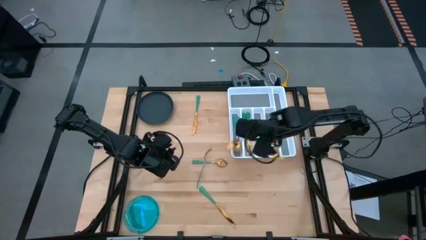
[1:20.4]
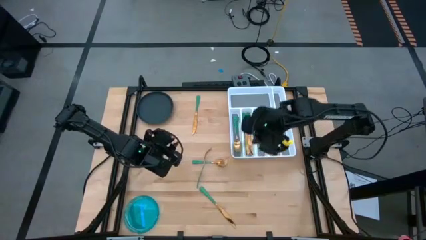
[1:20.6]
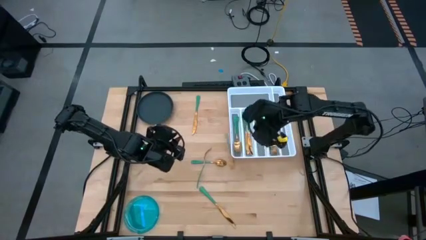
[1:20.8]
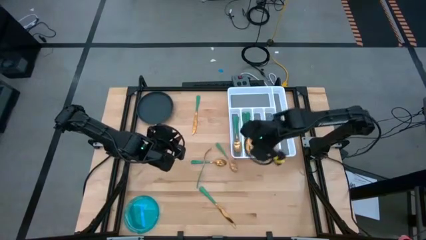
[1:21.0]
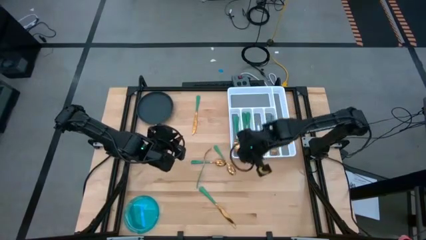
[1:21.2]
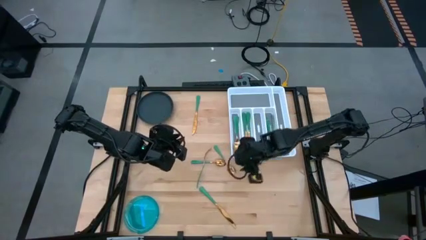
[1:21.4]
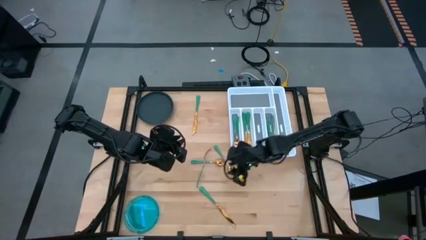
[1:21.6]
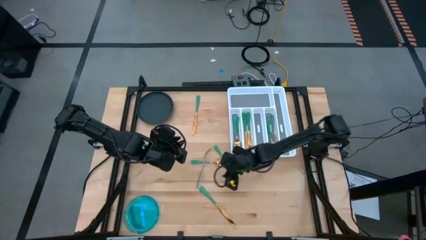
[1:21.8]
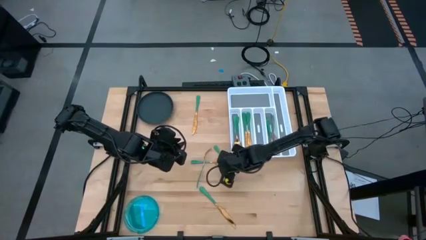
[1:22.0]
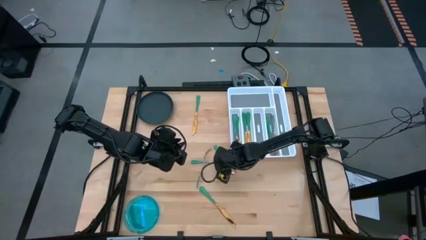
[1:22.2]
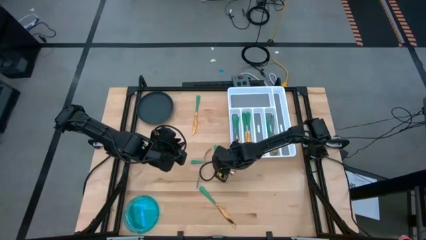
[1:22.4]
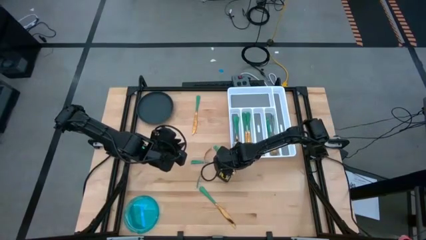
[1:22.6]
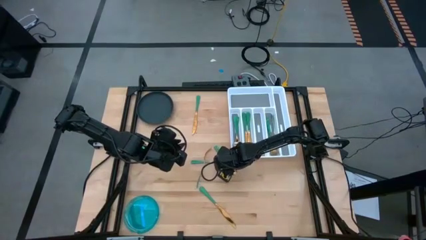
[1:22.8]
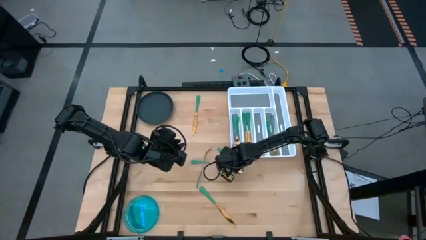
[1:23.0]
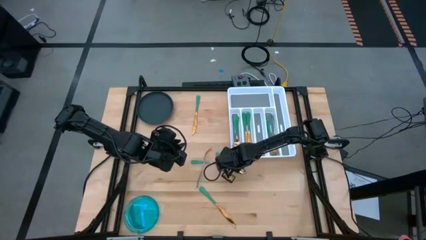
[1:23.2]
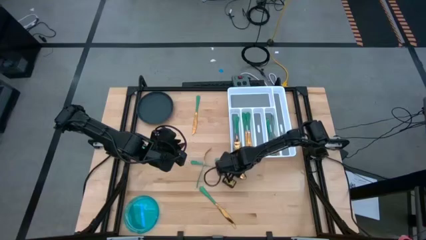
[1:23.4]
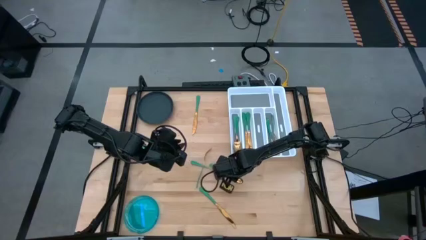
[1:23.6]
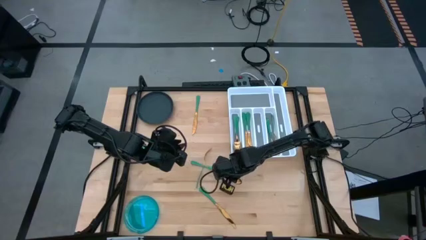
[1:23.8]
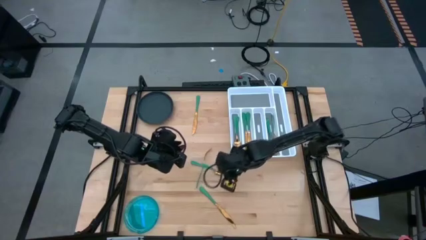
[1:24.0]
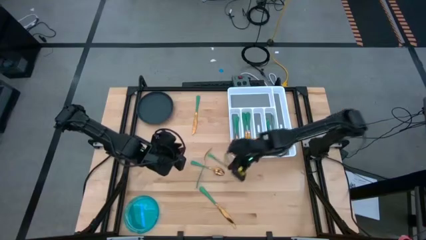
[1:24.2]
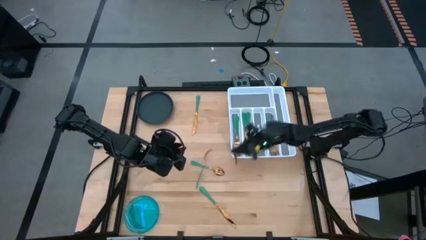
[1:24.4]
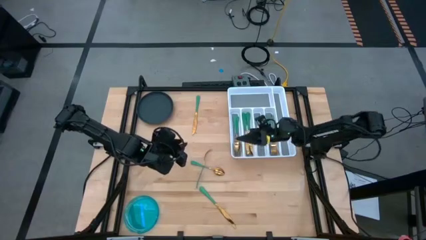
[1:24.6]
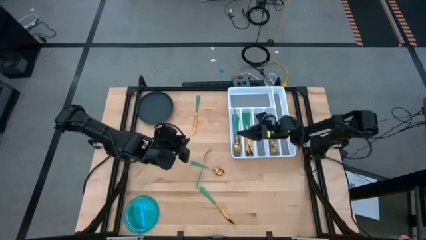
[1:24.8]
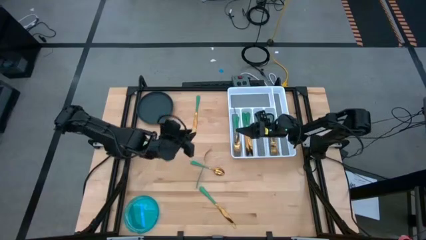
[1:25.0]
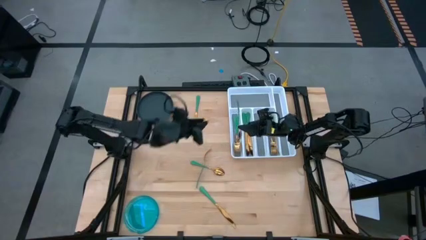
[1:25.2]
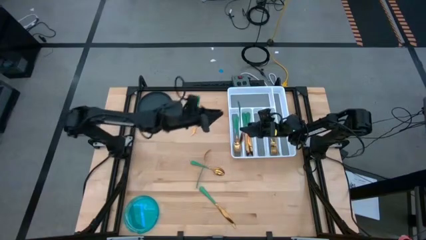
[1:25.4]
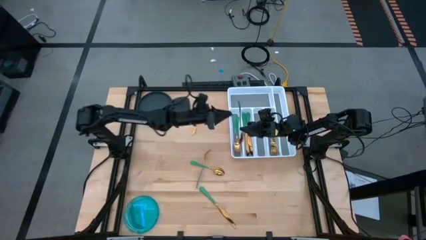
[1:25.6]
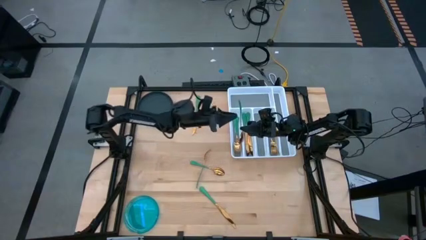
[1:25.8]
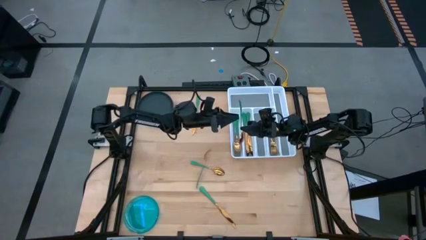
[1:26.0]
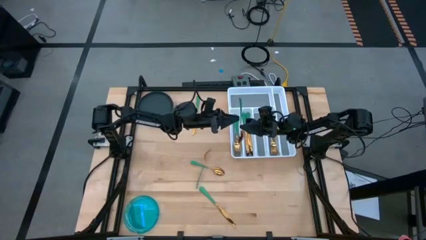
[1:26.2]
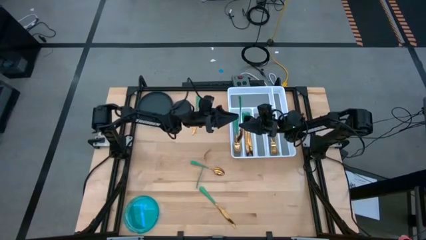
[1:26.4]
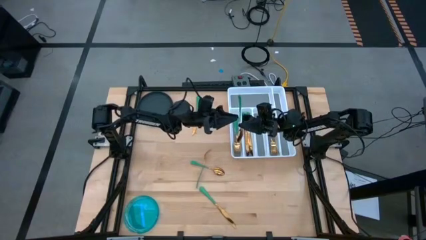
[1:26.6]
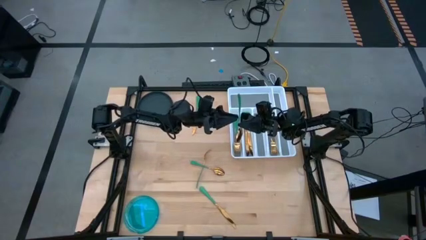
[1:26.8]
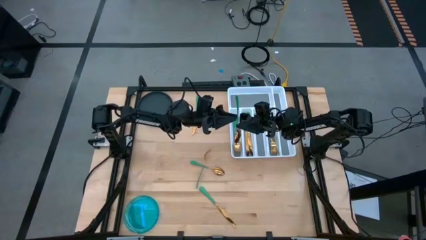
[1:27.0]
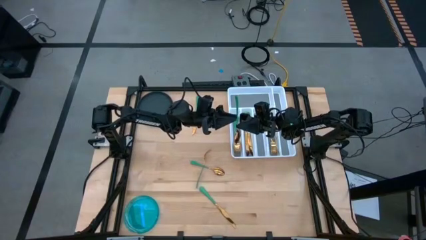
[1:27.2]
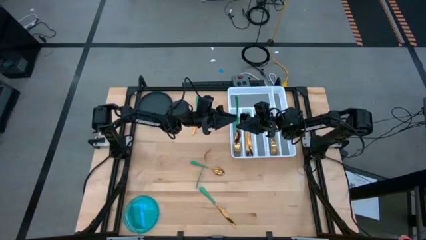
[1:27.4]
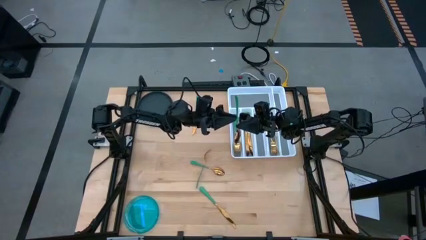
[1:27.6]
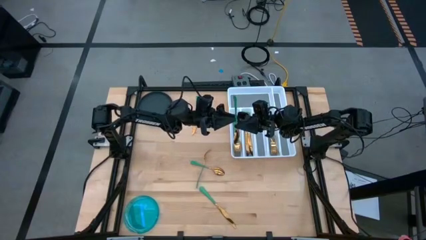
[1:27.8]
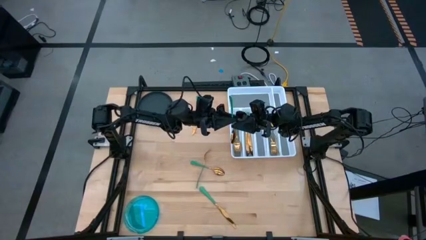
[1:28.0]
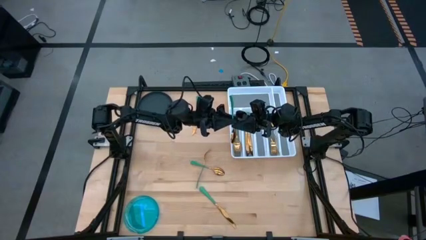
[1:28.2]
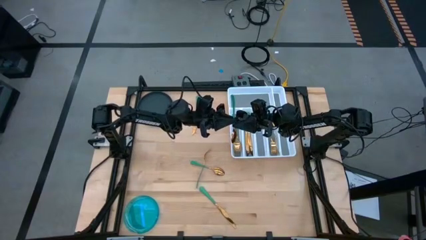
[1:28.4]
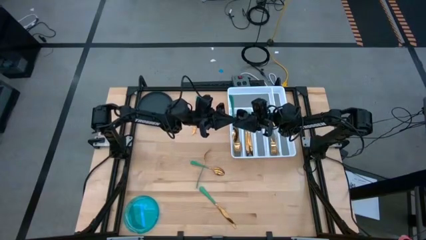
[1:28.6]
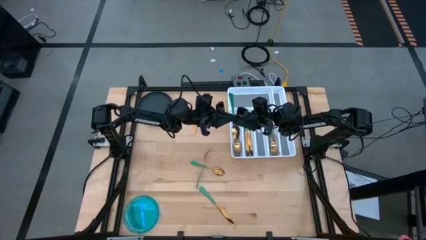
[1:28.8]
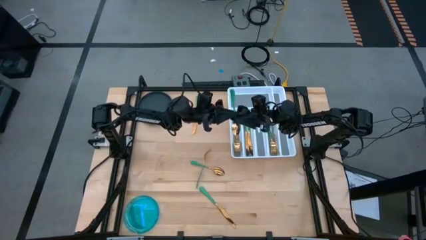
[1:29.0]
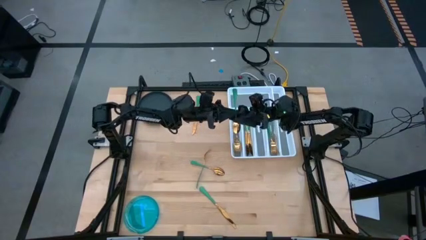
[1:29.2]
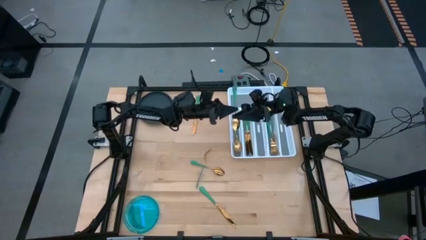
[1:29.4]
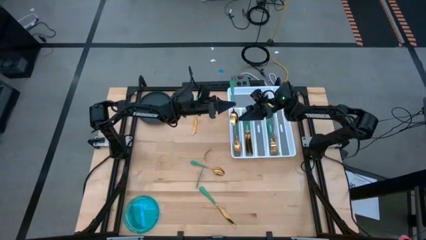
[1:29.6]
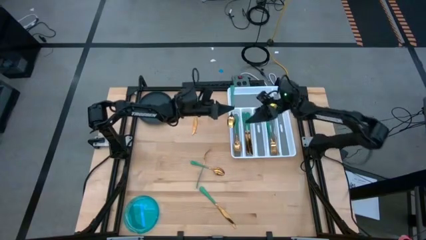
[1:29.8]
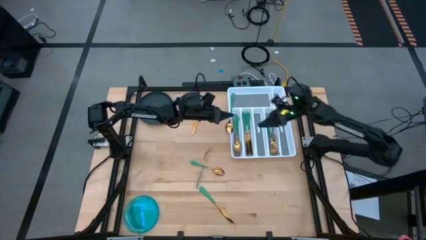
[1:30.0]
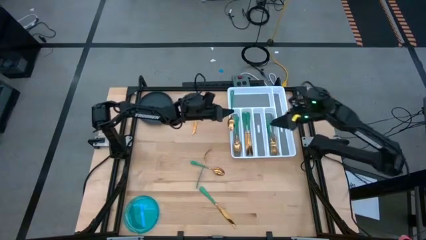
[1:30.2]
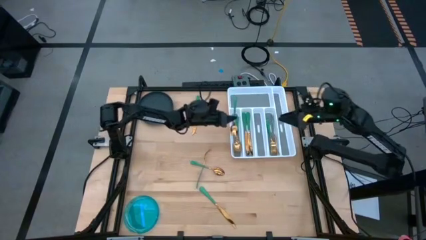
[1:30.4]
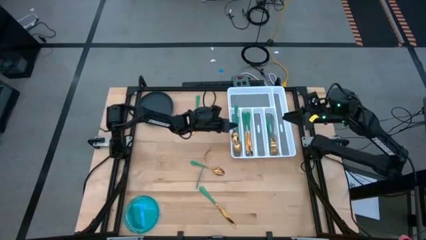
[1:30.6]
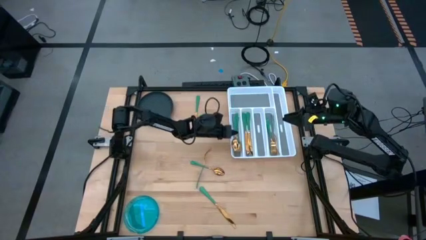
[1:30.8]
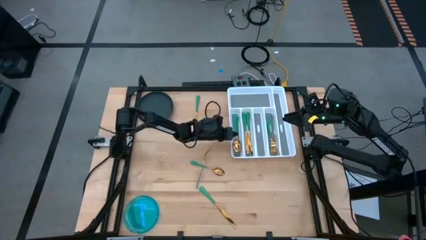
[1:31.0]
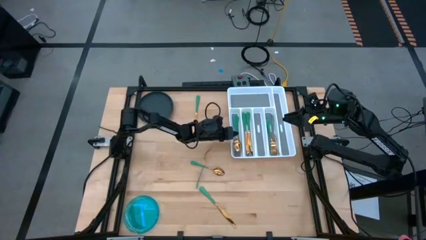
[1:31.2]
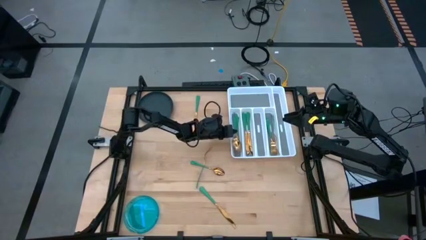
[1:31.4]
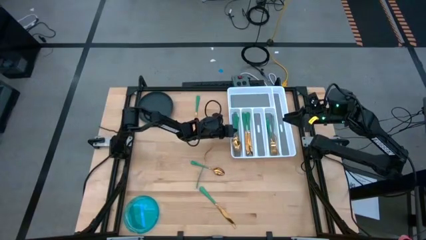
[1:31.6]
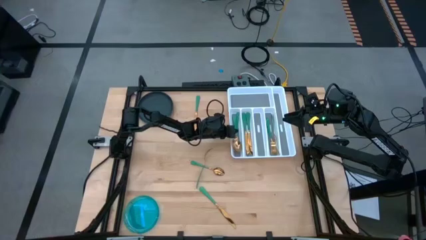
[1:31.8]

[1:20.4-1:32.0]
Task: Sort silverware
Put the right green spoon on the silverware tray with the other green spoons

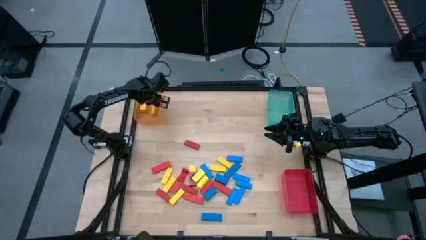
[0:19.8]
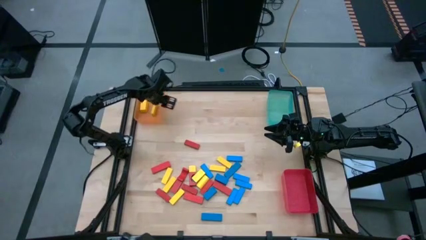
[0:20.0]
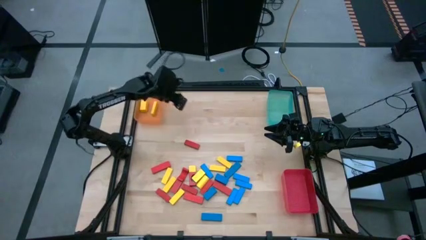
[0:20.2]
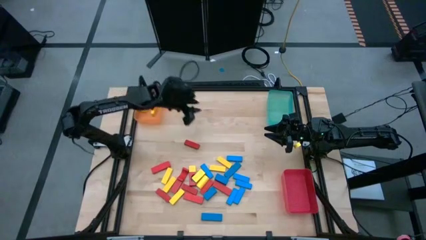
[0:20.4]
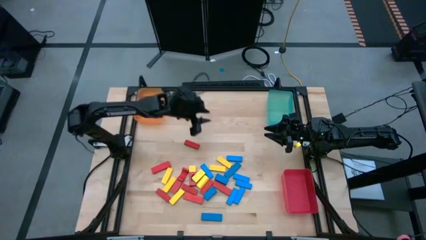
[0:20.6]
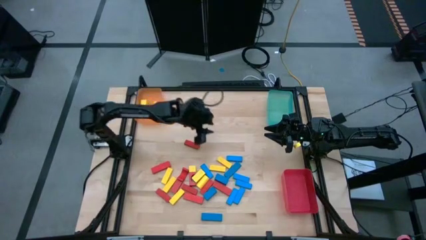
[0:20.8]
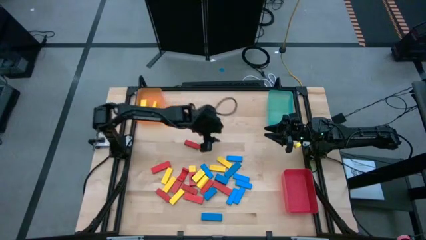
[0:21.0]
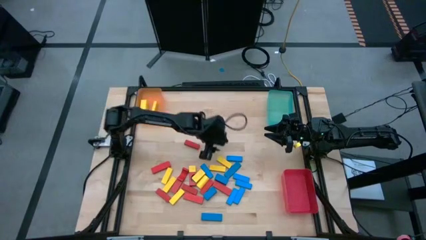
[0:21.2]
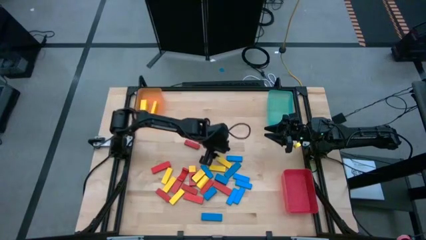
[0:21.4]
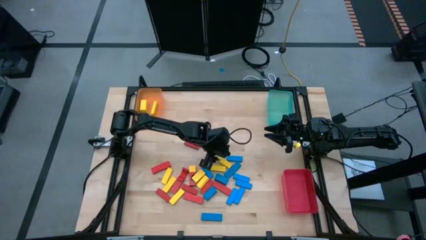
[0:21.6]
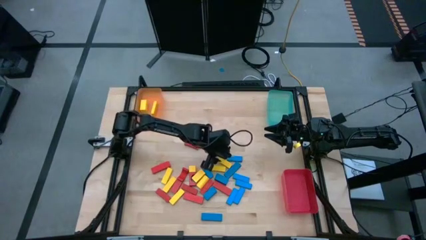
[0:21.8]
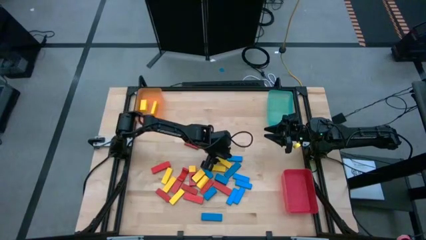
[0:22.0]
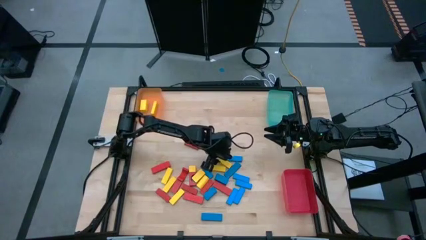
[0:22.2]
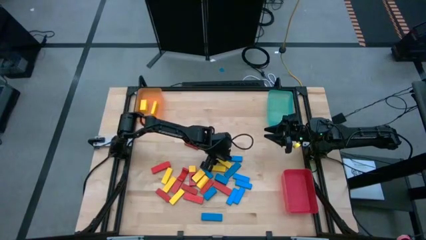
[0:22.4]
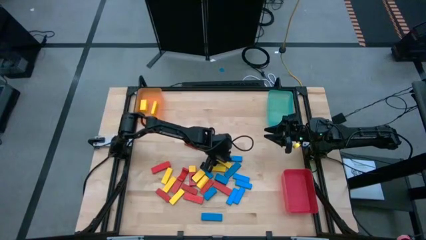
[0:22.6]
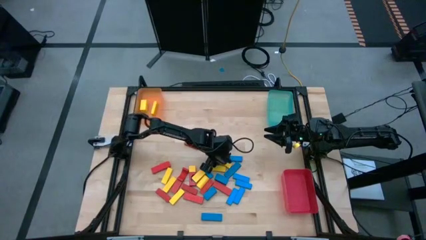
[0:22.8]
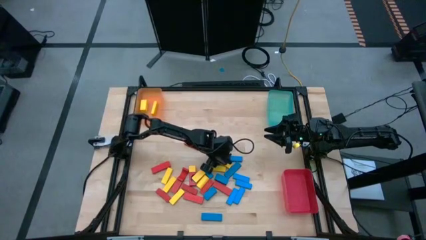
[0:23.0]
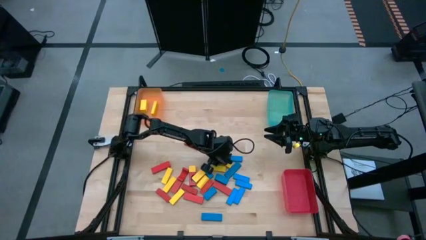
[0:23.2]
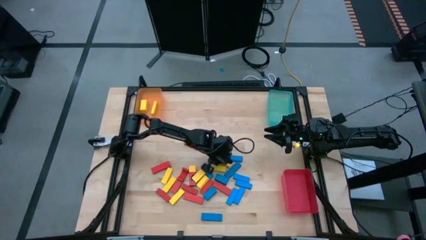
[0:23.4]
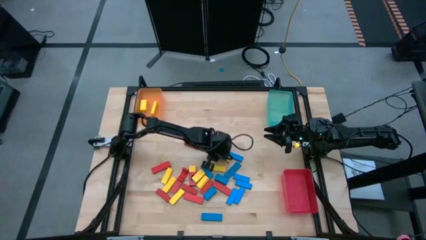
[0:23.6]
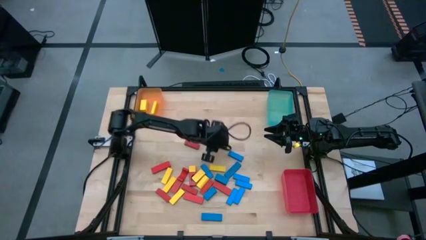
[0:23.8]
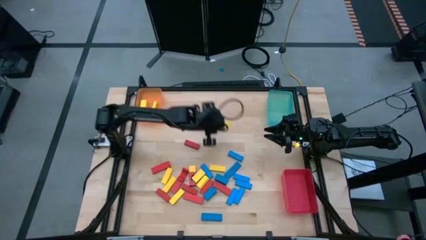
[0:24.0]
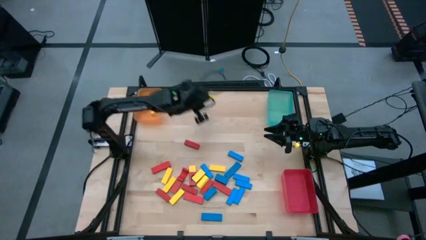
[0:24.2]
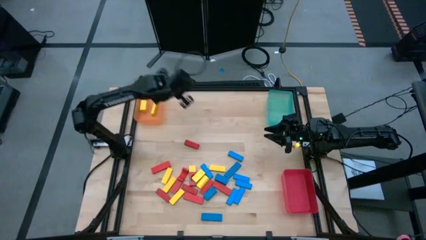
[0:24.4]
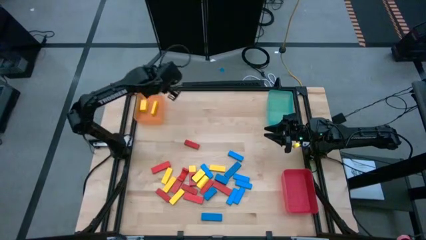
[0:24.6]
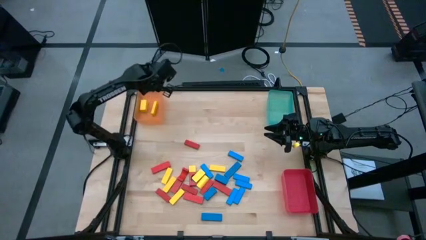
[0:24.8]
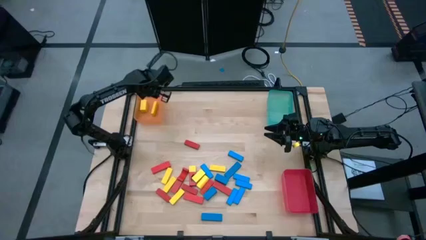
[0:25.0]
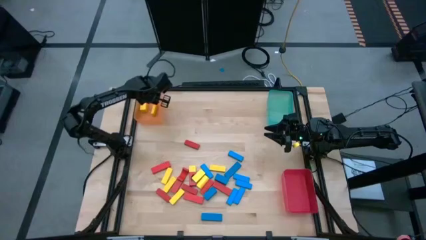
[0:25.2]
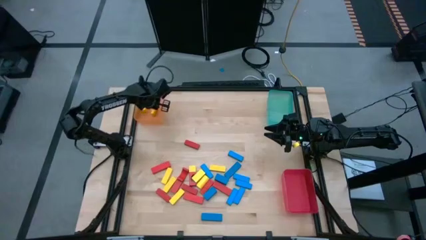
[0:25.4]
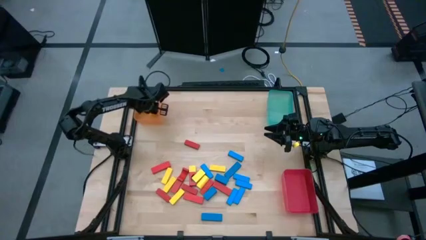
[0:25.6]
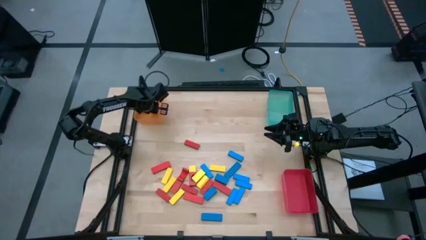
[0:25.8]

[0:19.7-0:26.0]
Task: Sort blocks
Put the yellow block into the orange bin
